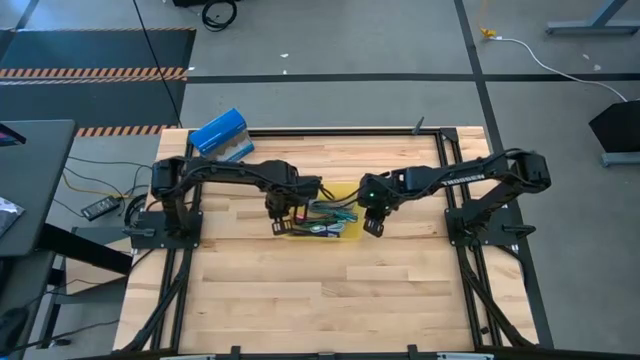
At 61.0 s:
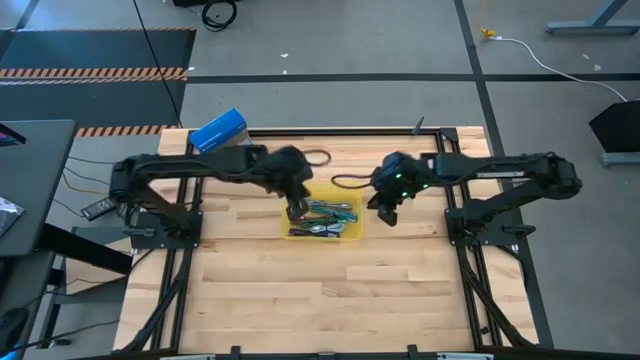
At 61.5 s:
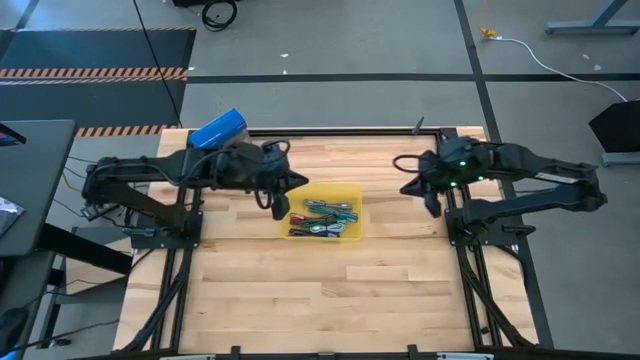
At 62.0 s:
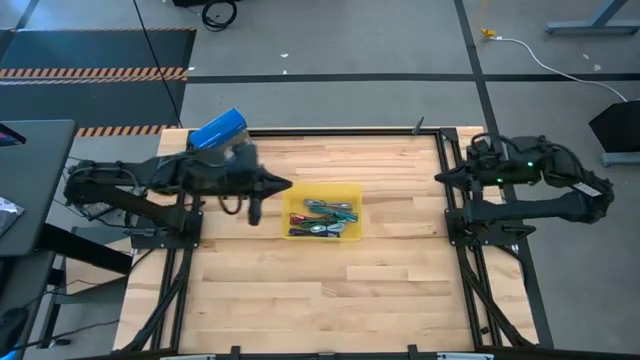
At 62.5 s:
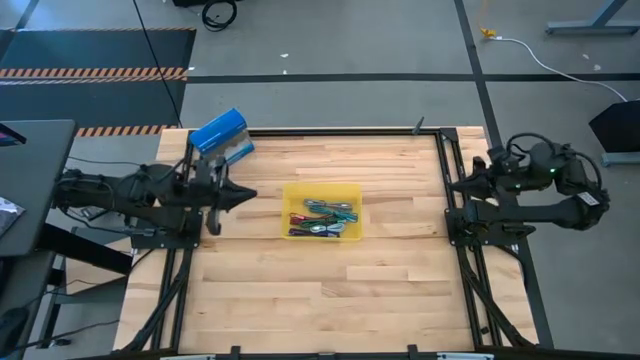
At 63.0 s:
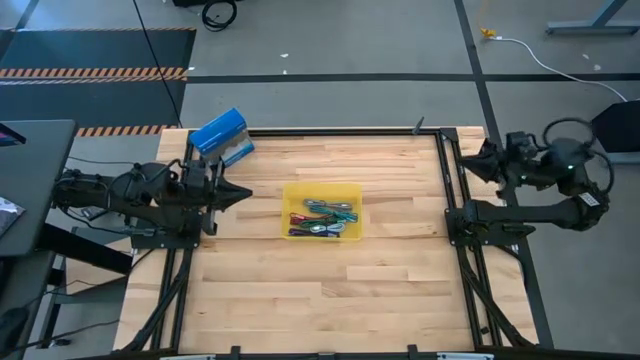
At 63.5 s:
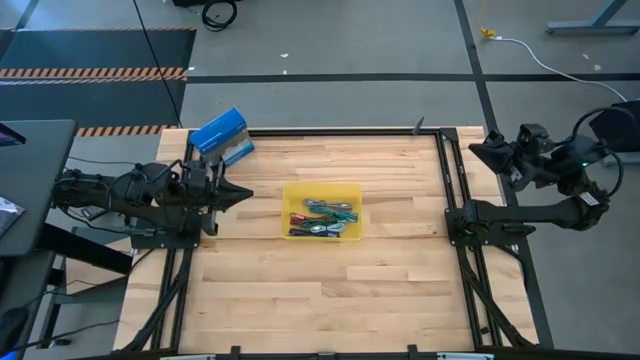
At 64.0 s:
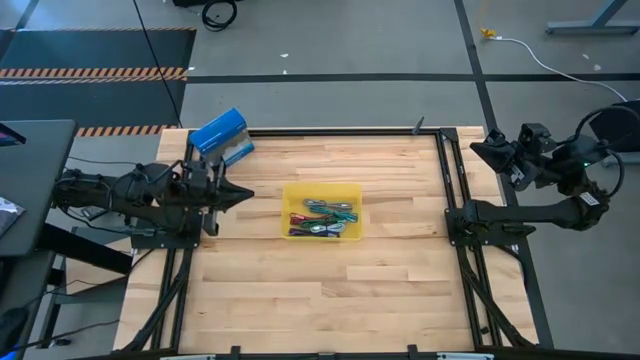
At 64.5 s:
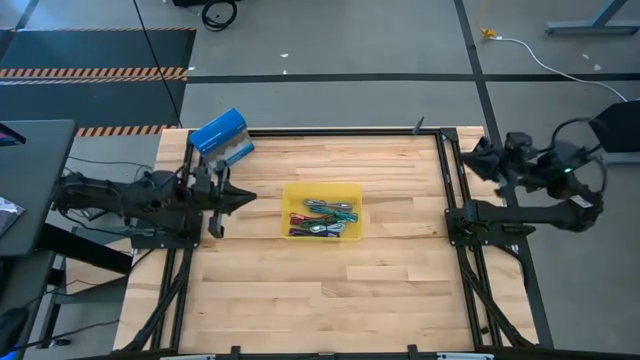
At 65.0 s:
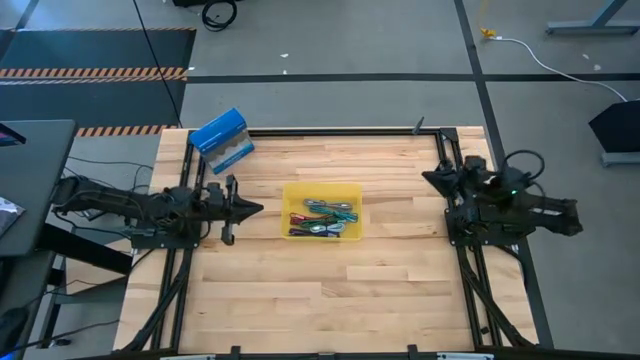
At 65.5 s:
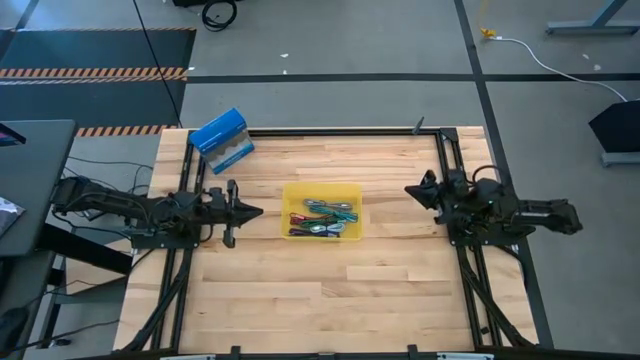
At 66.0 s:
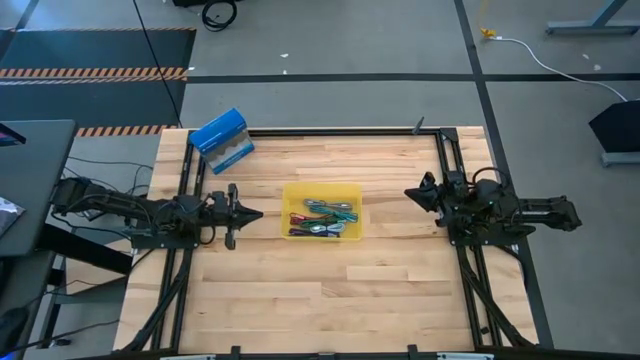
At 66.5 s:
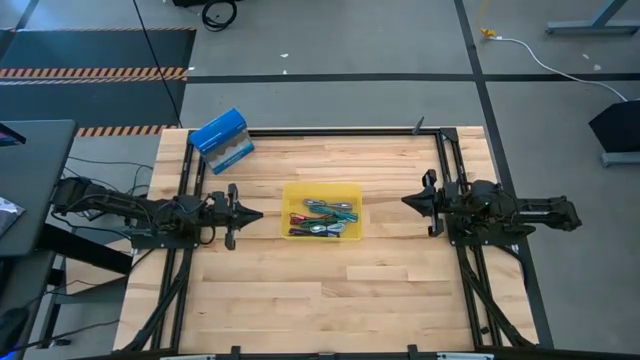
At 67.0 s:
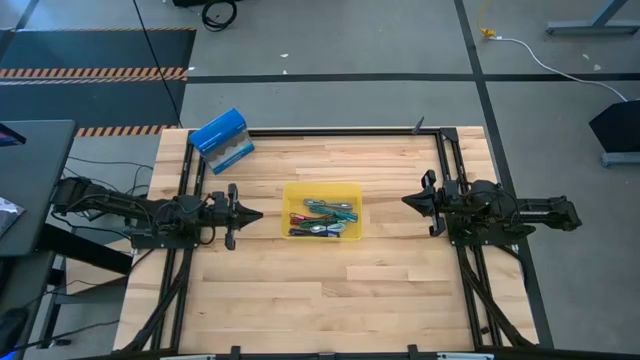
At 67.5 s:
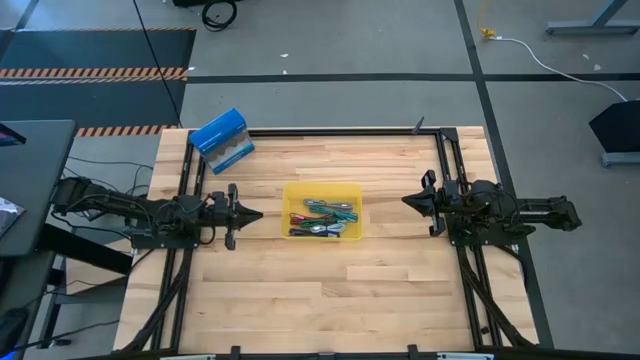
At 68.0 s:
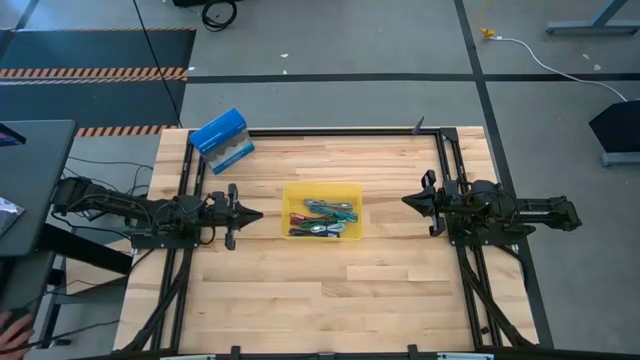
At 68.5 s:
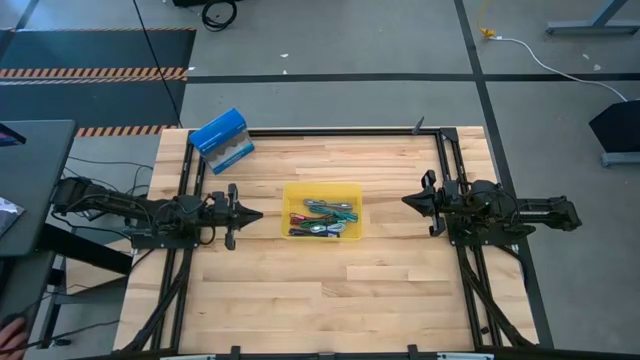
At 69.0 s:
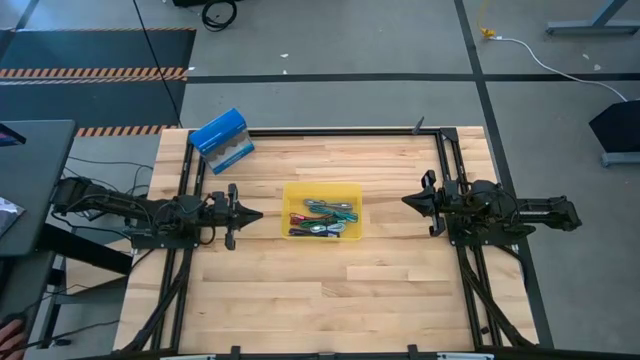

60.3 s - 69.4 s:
Task: Pick and place USB-C Cables
Return to Home Position

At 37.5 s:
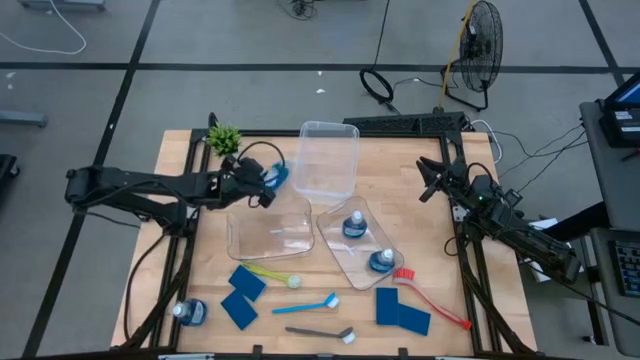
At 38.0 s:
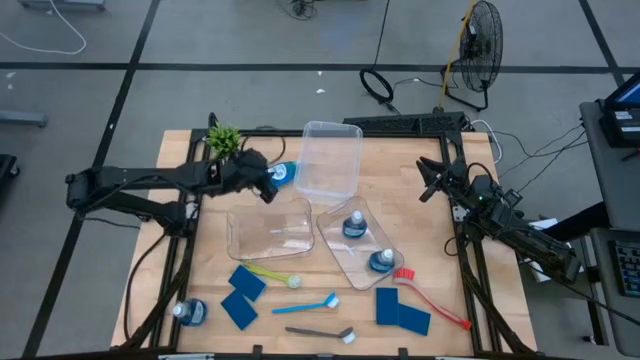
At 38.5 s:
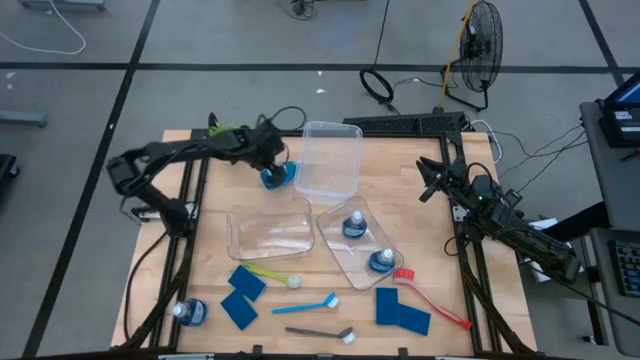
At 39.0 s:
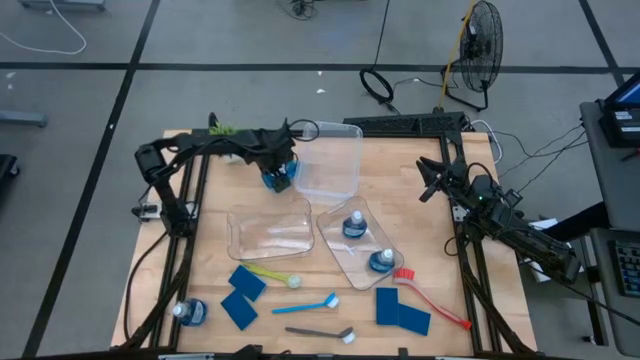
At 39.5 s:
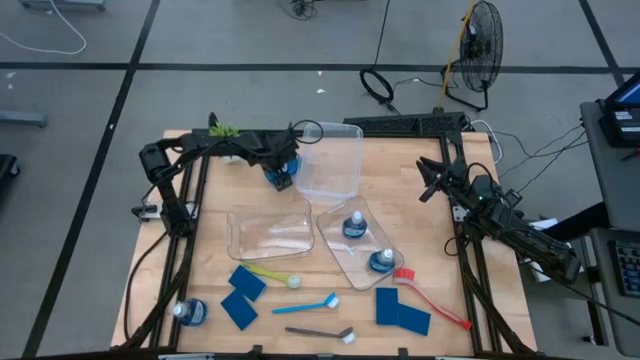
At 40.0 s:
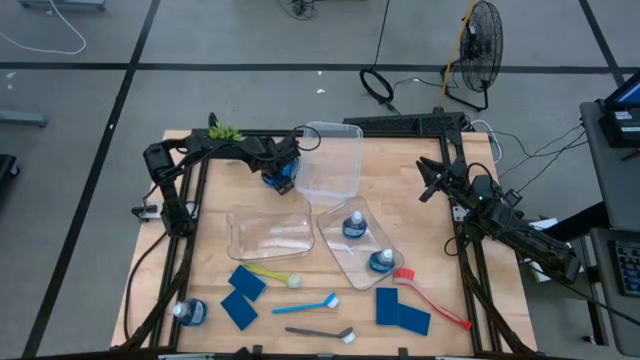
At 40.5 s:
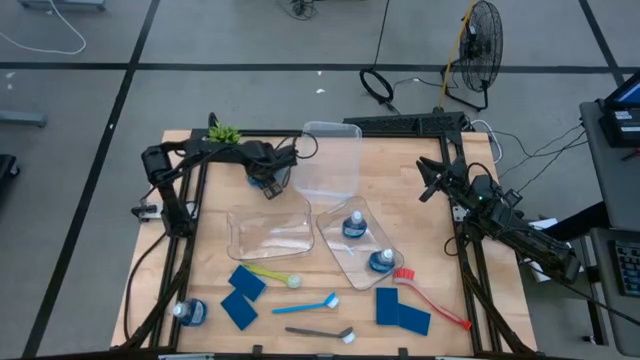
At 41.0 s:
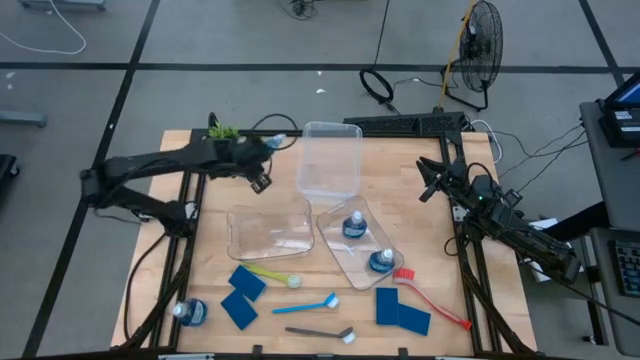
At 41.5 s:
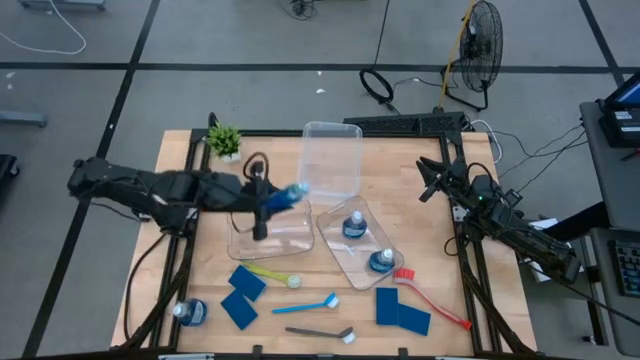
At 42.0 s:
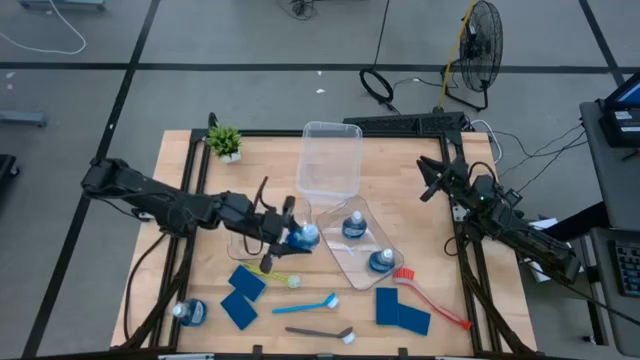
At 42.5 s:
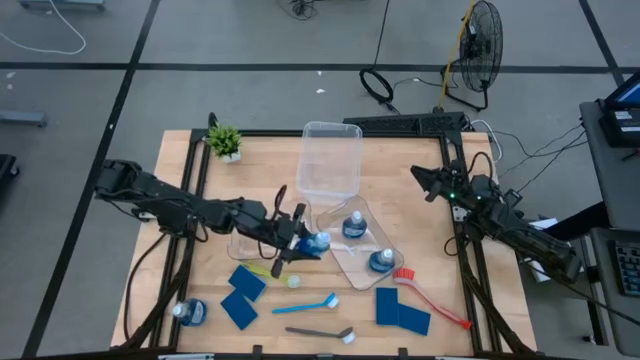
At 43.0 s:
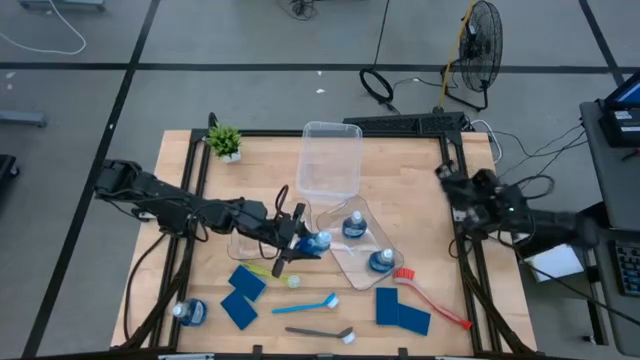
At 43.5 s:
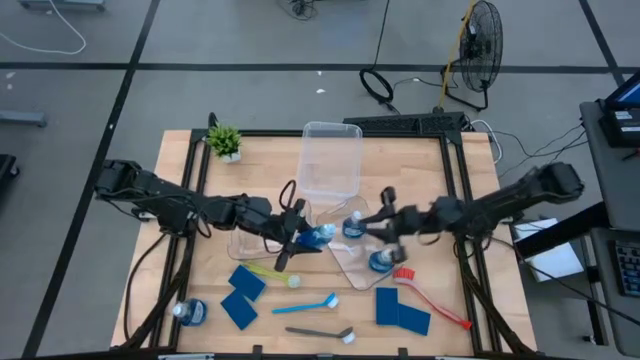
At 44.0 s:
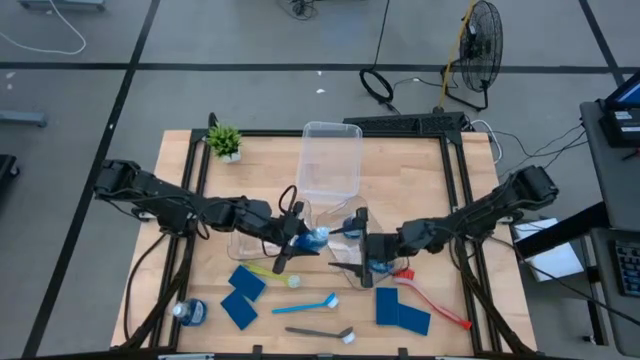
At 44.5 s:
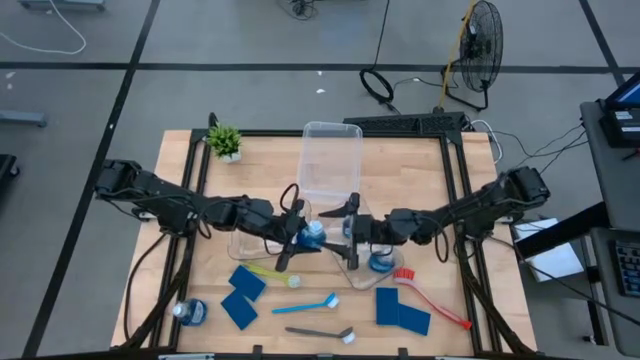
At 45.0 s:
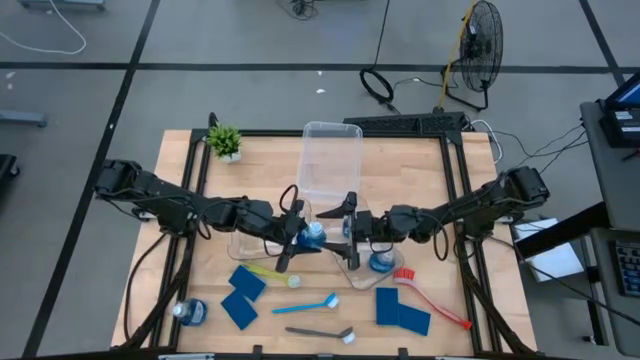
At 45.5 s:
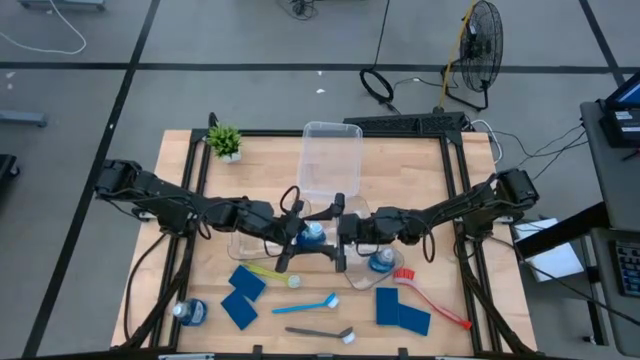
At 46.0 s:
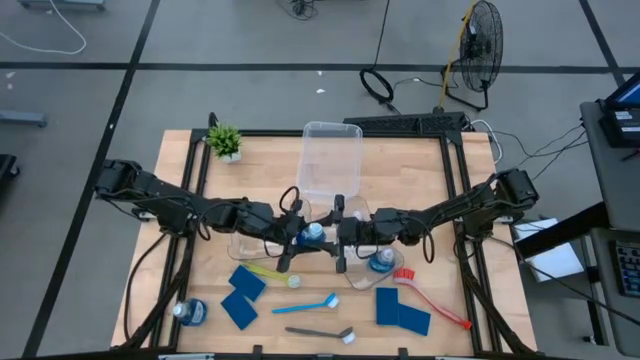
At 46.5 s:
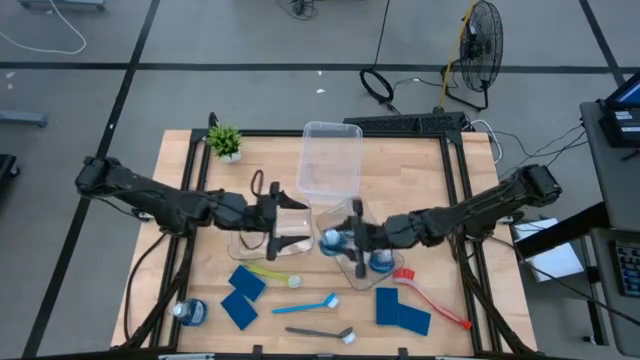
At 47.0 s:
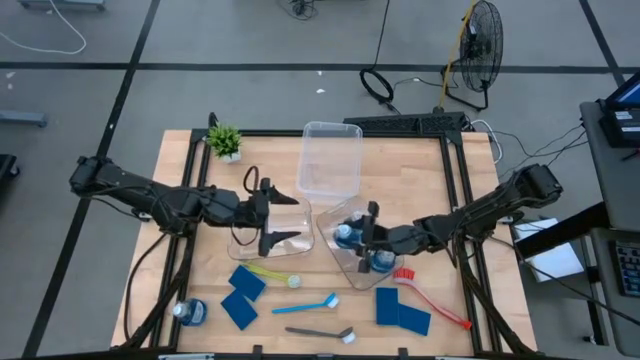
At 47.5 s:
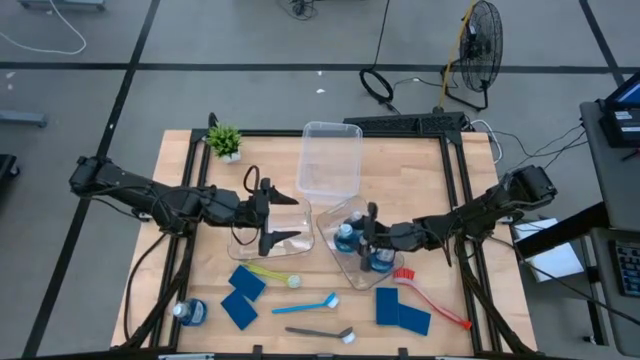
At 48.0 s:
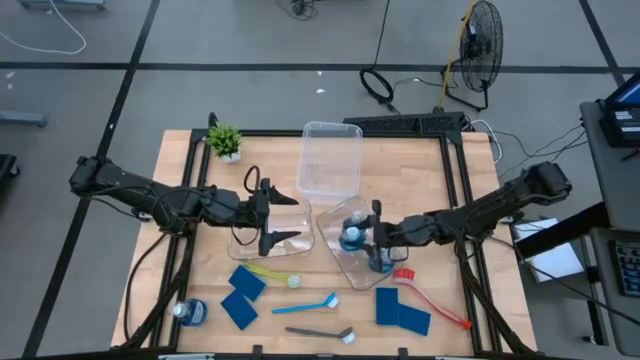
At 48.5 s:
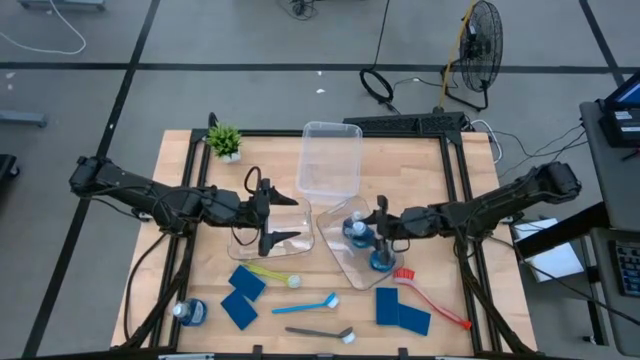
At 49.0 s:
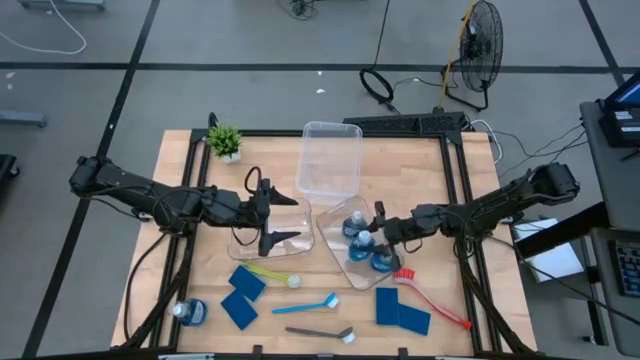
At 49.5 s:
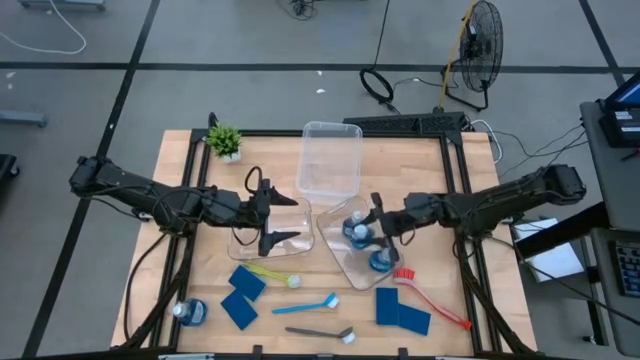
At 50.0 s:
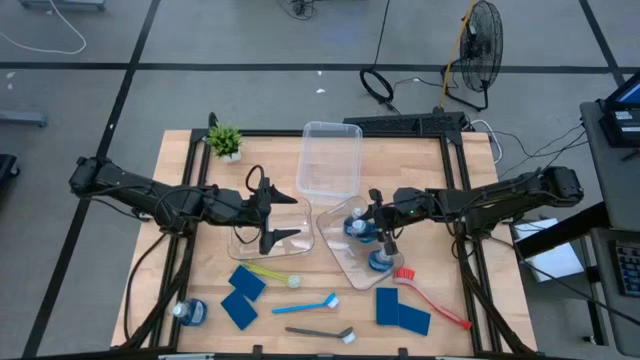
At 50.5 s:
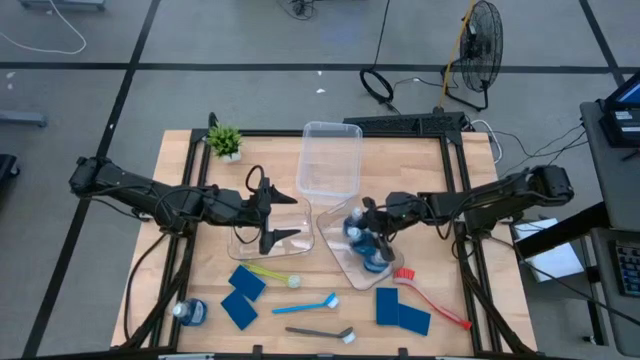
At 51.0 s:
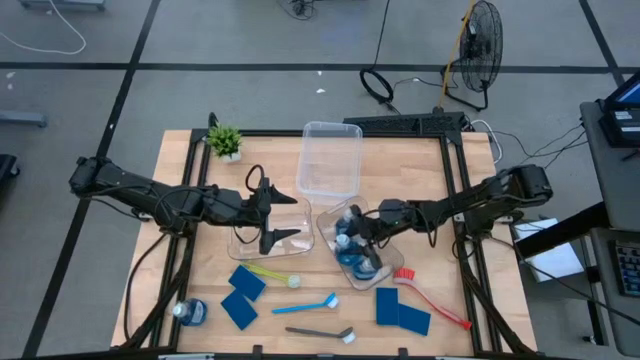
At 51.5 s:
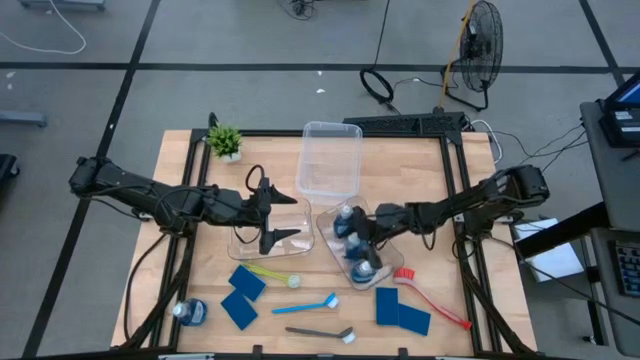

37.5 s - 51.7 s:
Task: Pick & Place Kitchen Sink Supplies
Put the blue soap dispenser into the right transparent bin
